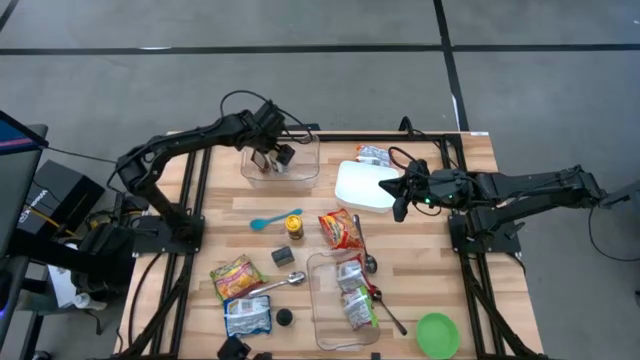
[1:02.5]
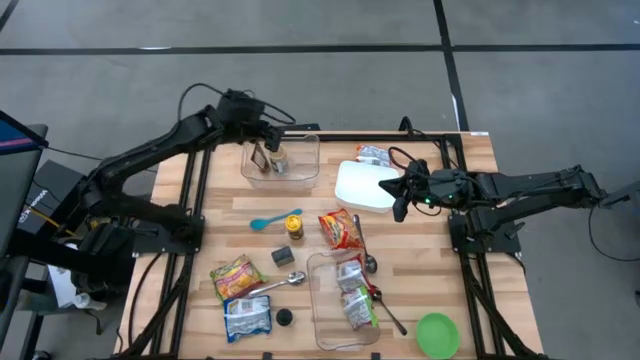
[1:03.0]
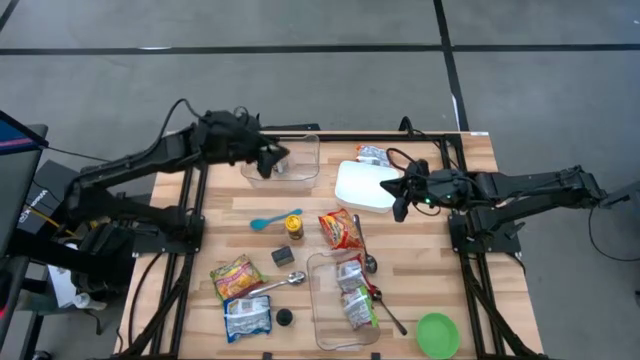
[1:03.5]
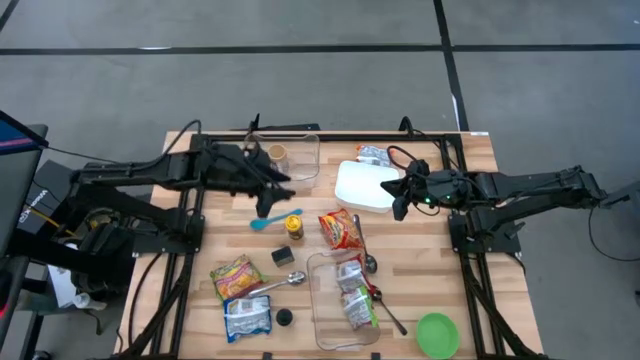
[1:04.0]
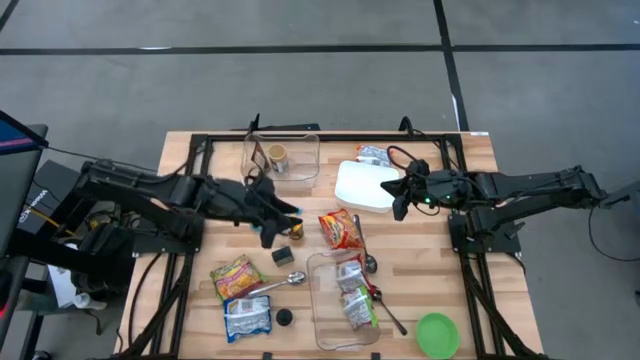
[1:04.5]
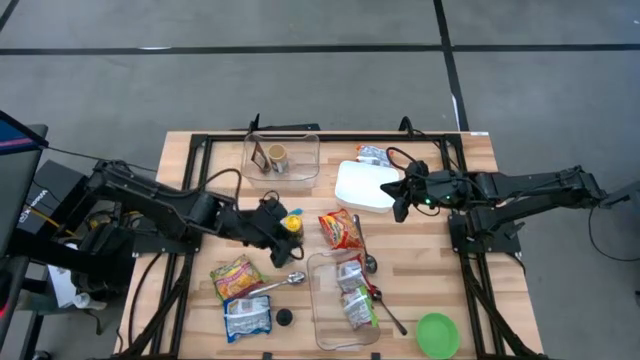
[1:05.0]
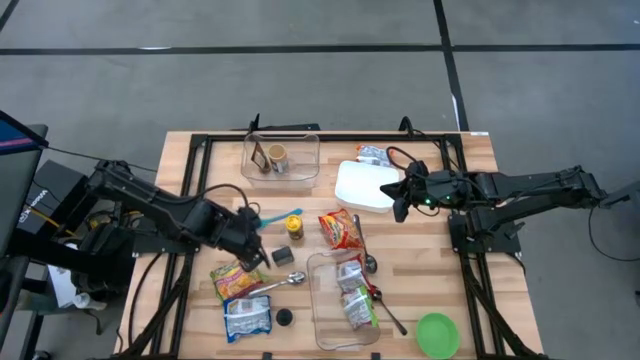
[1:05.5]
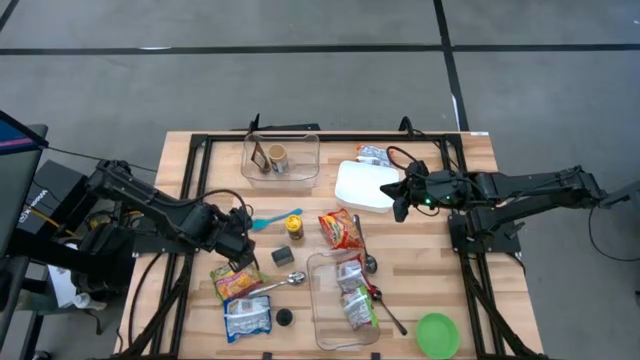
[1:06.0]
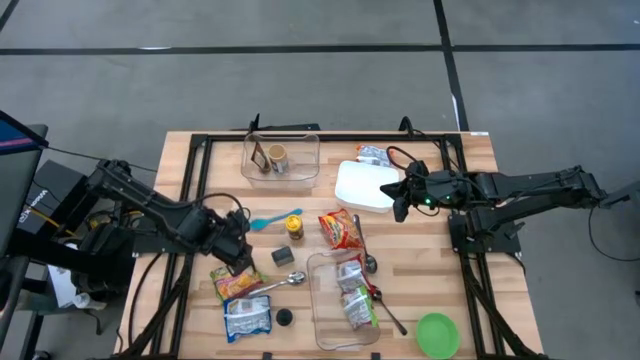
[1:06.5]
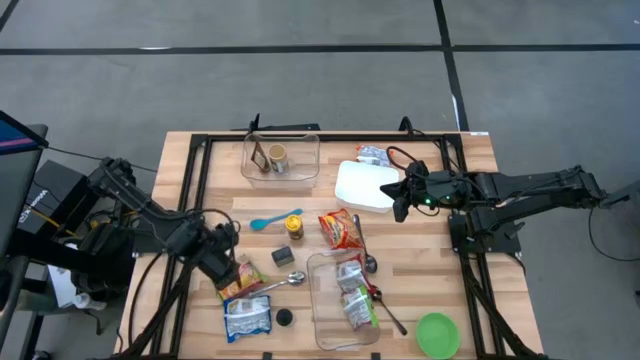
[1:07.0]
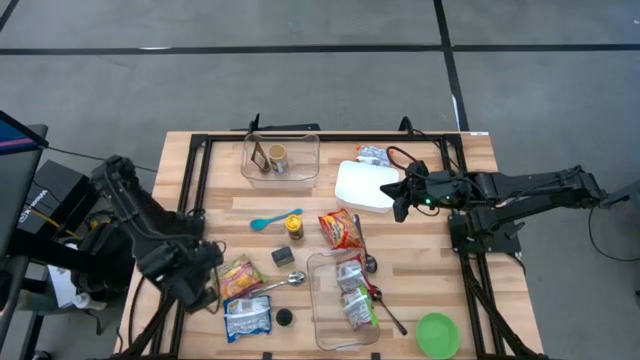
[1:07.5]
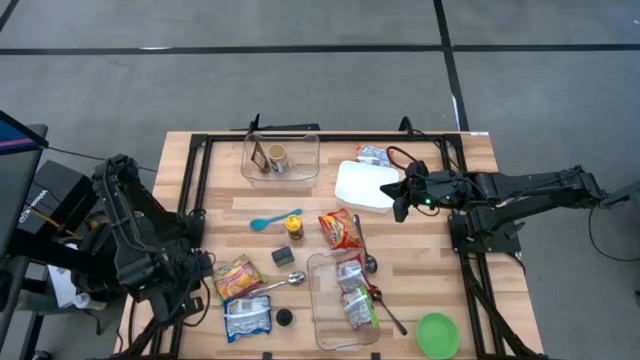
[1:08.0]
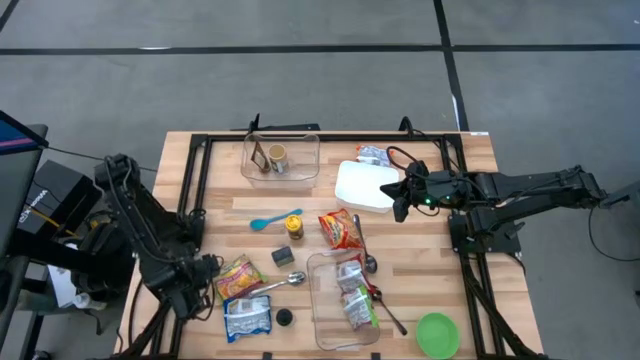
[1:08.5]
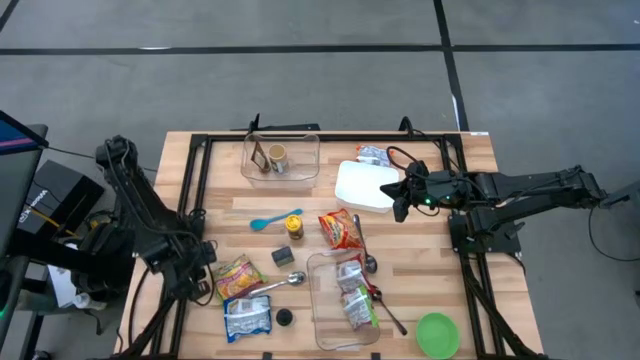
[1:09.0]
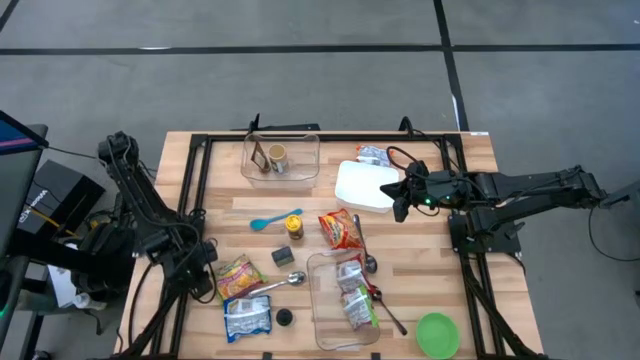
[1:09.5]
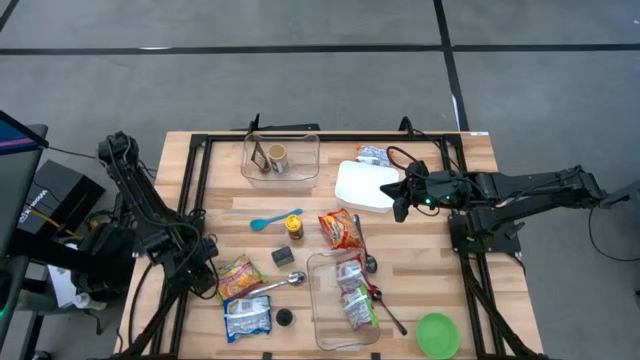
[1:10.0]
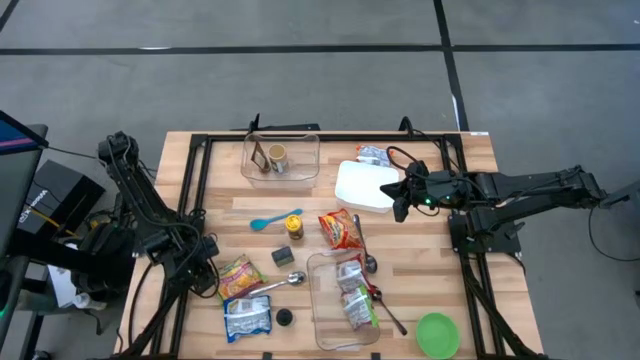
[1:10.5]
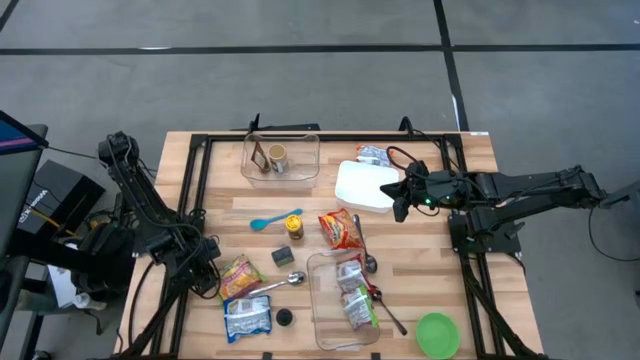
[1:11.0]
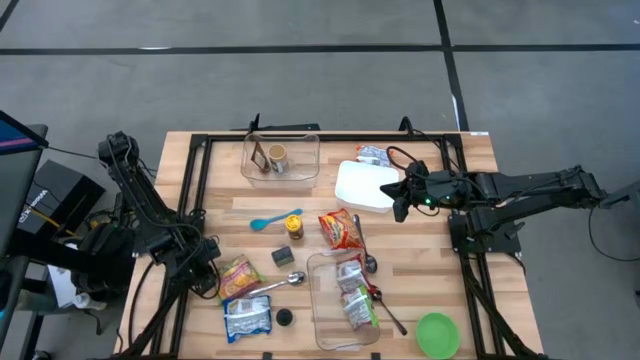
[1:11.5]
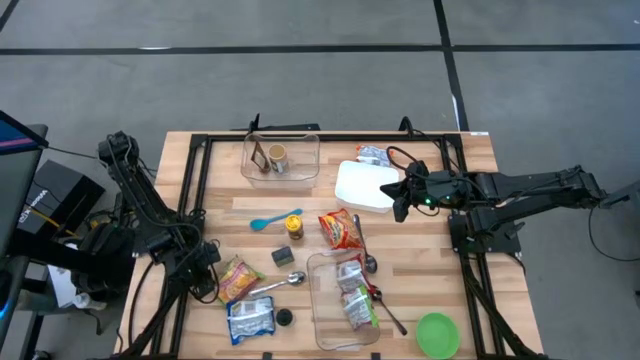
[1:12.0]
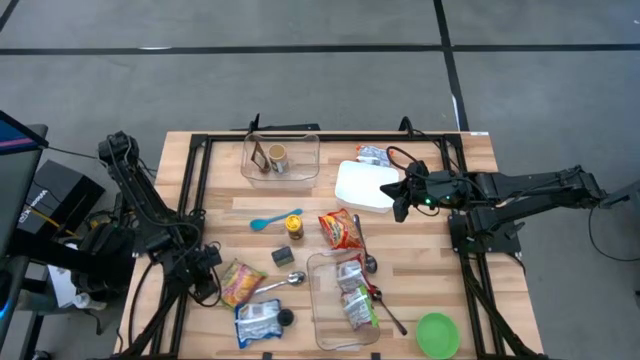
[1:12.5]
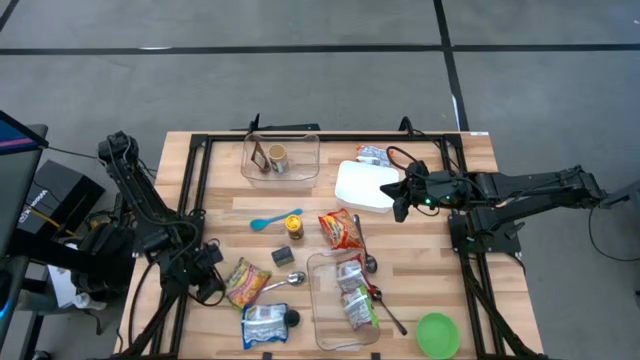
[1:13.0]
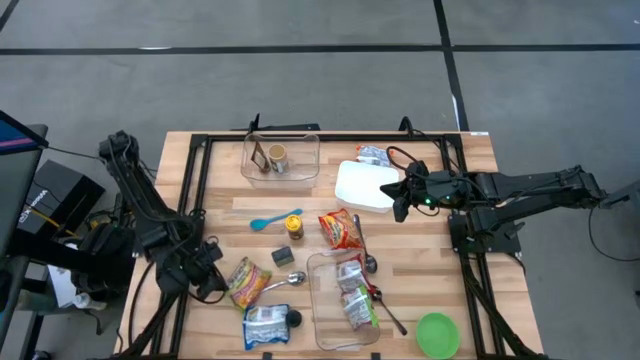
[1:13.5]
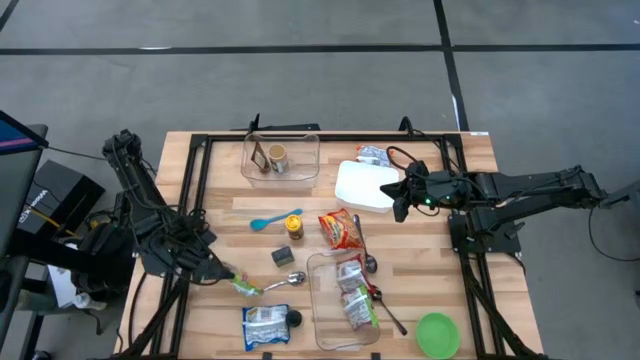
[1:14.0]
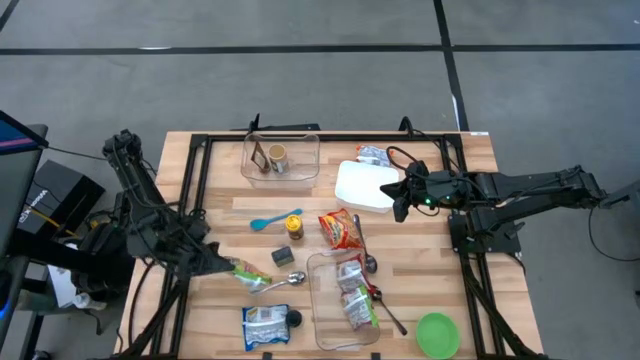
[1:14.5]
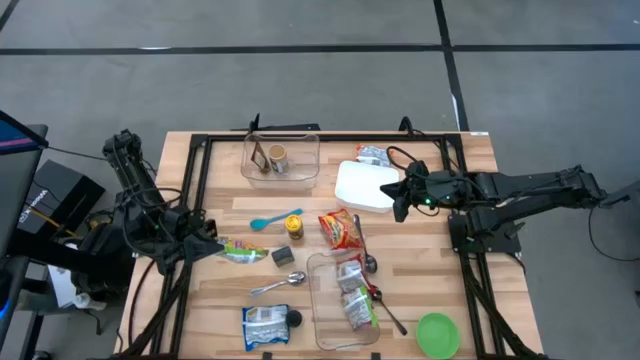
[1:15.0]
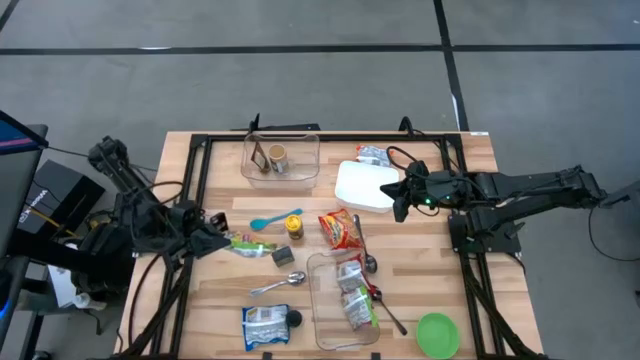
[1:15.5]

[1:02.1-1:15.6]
Task: Pick & Place Food Item
Put the green noodle pack into the bottom transparent bin

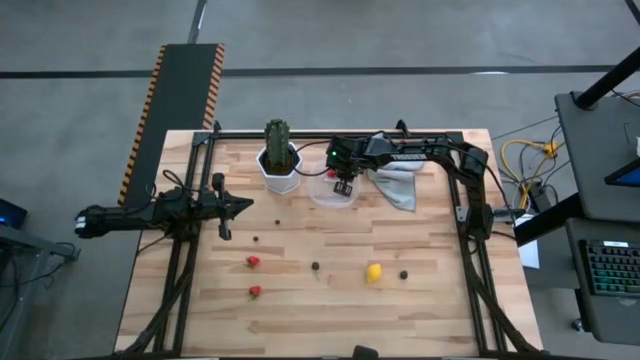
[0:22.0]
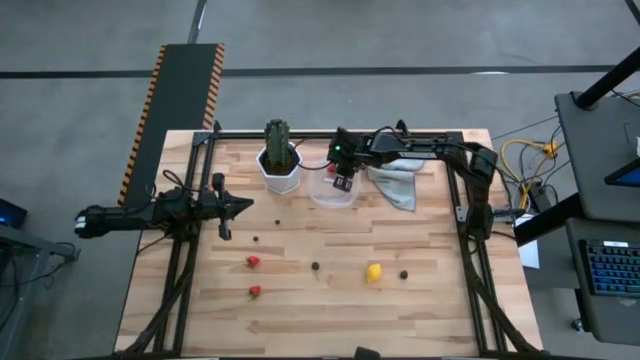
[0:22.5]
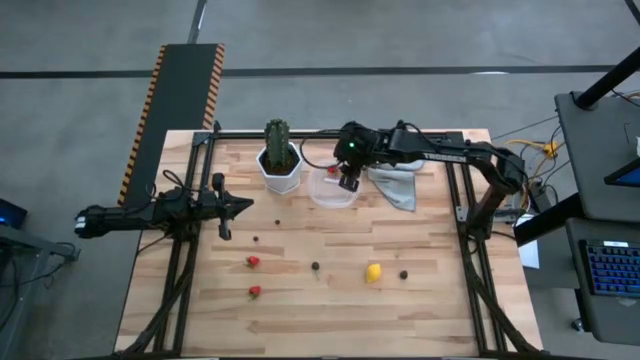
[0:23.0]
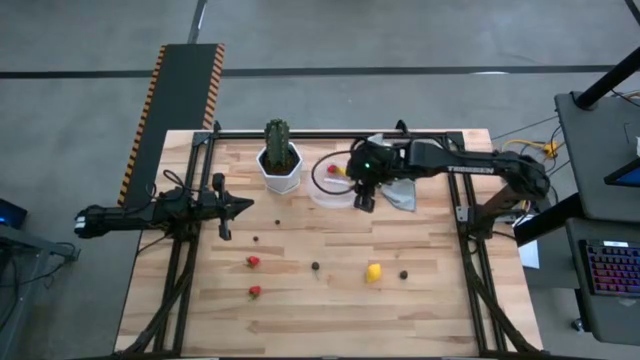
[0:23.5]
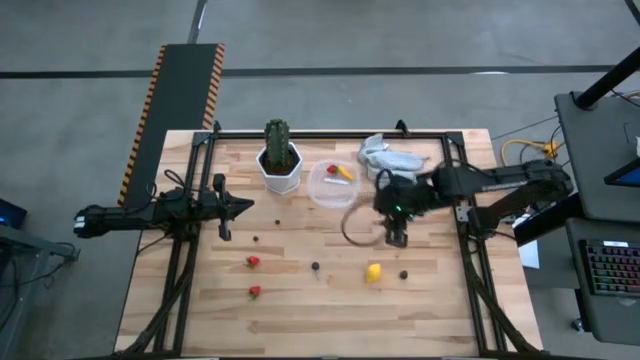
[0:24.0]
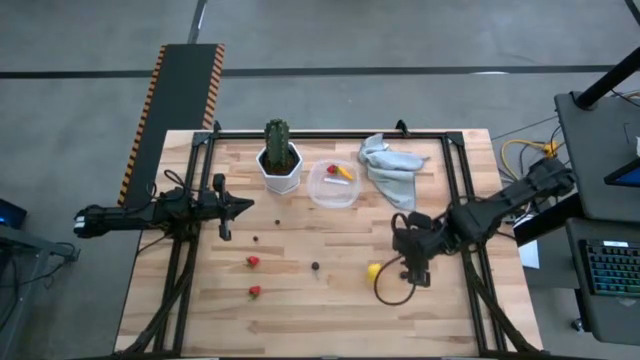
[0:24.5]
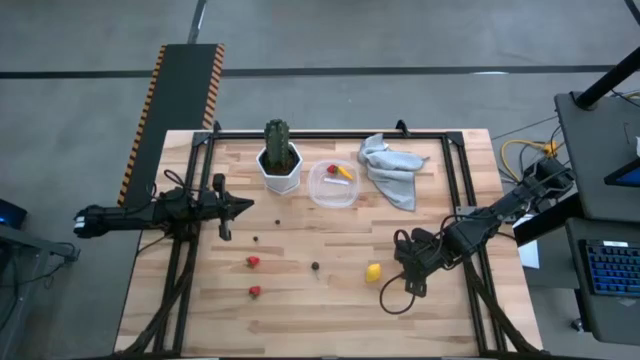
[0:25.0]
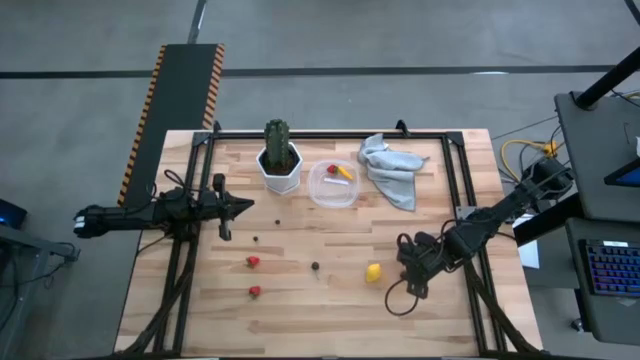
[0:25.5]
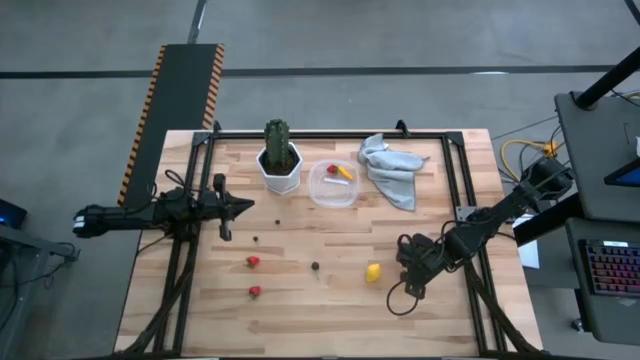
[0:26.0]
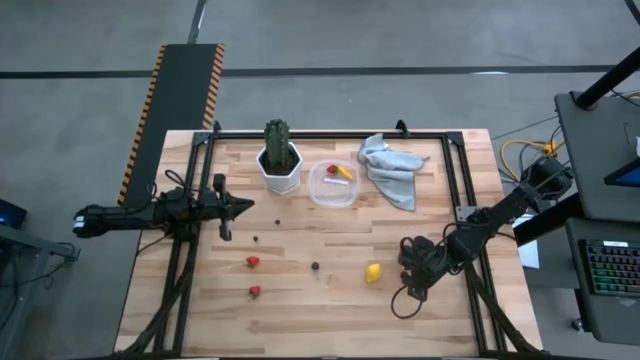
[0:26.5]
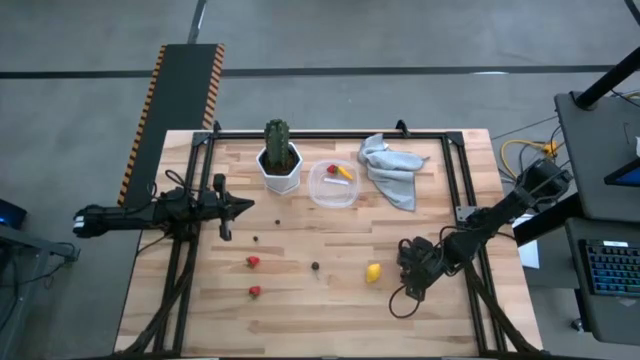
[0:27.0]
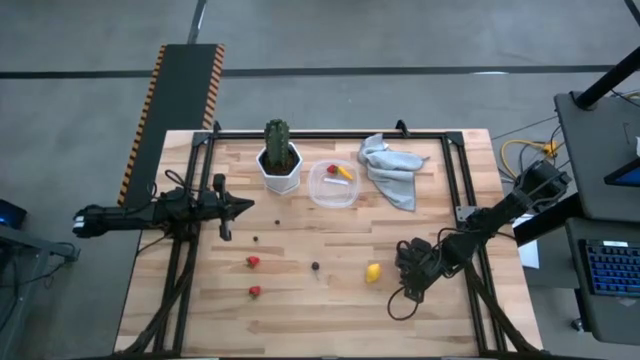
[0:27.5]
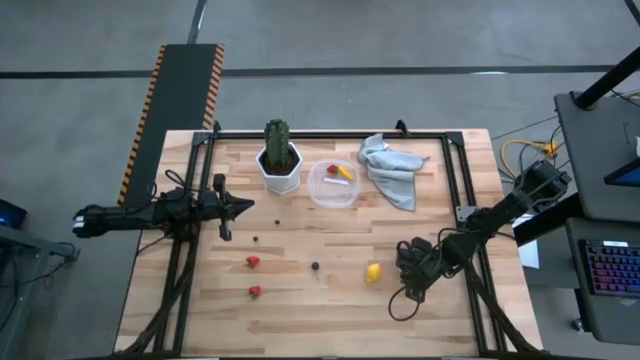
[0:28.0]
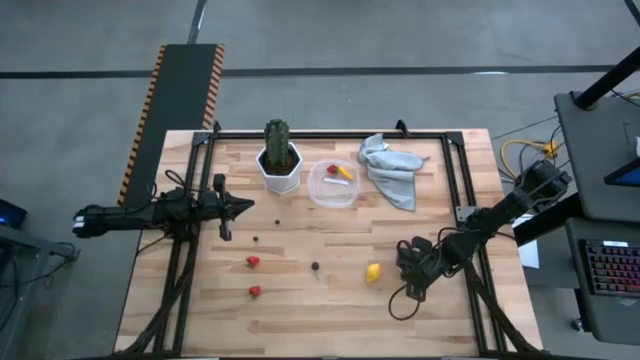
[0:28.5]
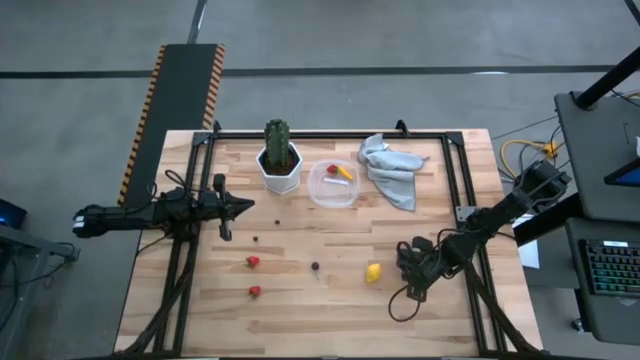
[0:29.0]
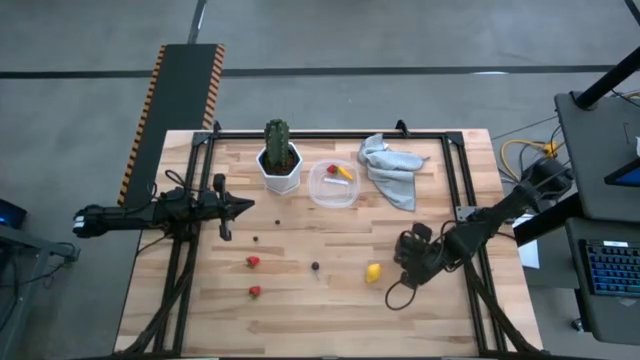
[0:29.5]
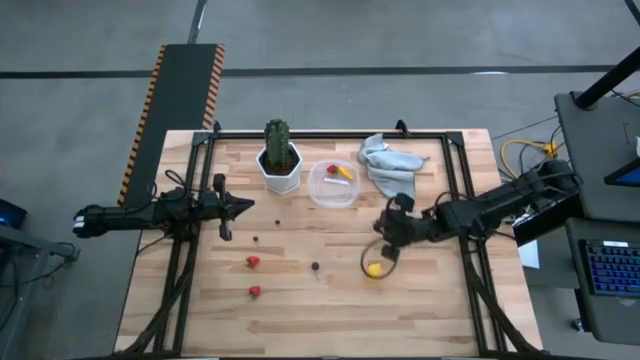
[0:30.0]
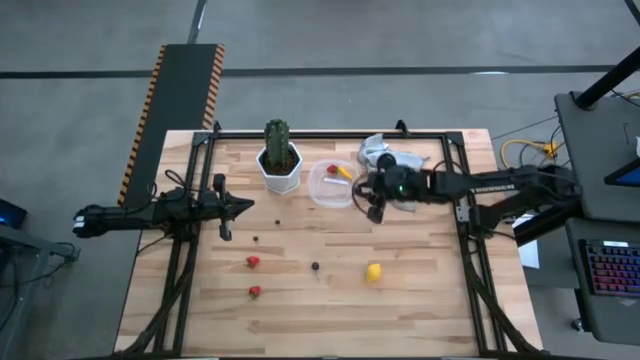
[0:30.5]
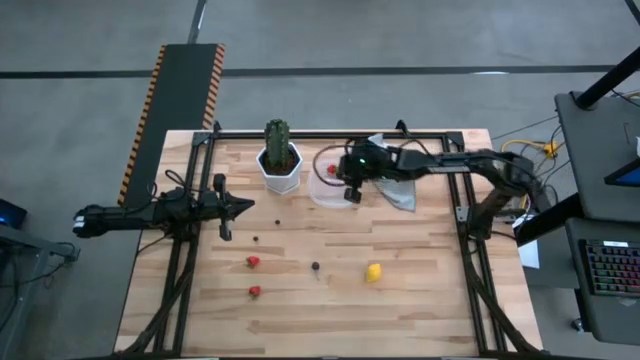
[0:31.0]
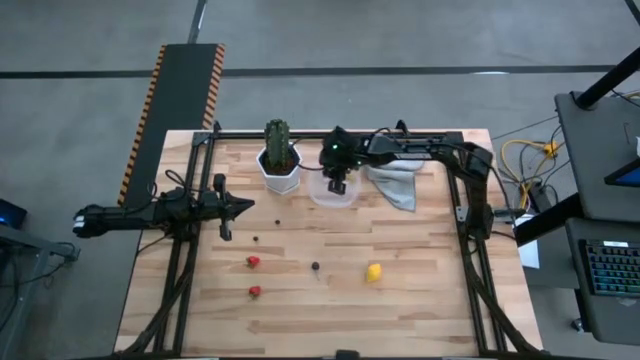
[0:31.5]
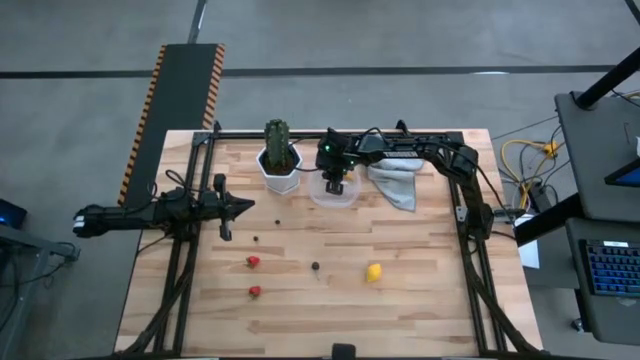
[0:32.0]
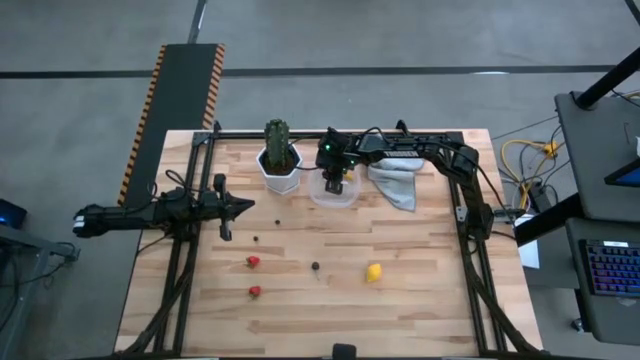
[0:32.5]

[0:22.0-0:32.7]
Task: Pick and placing Produce into tupperware
Put the black raspberry into the transparent bin
